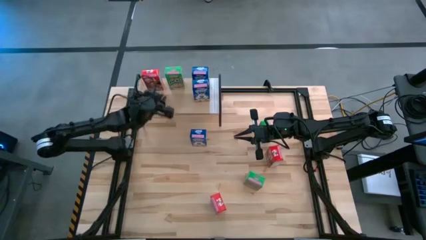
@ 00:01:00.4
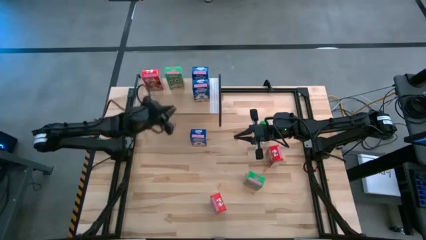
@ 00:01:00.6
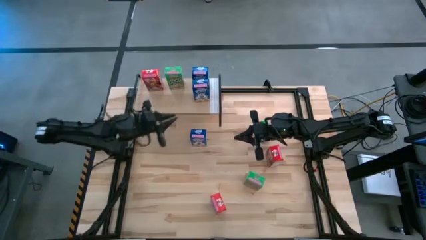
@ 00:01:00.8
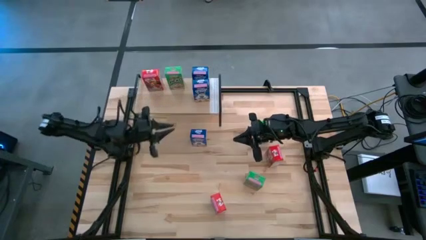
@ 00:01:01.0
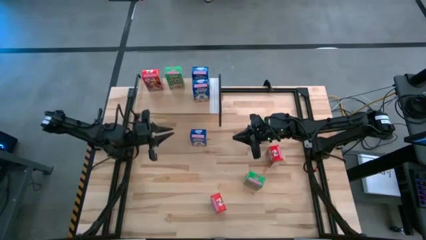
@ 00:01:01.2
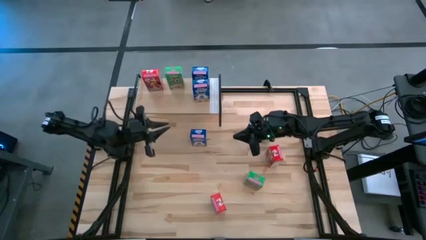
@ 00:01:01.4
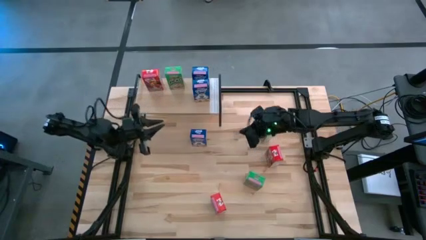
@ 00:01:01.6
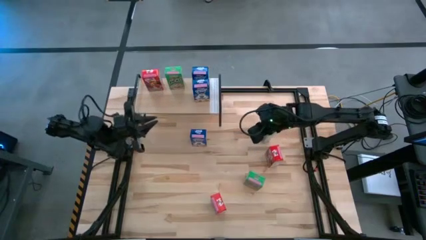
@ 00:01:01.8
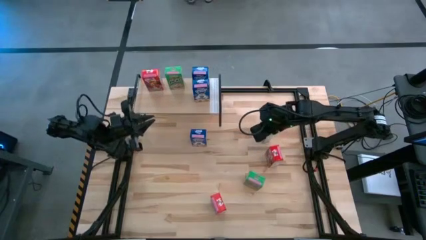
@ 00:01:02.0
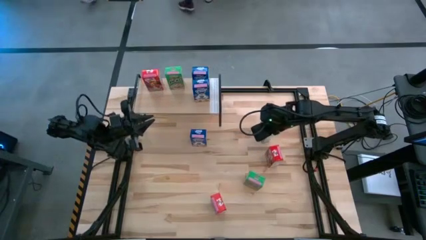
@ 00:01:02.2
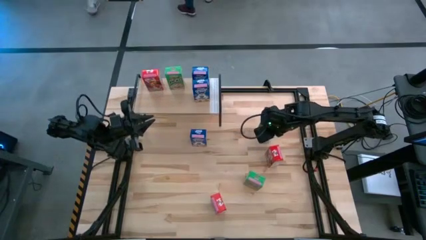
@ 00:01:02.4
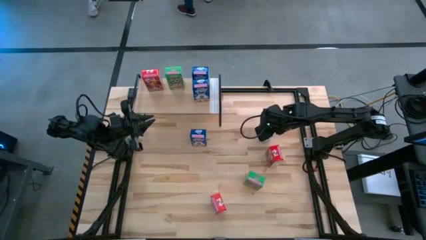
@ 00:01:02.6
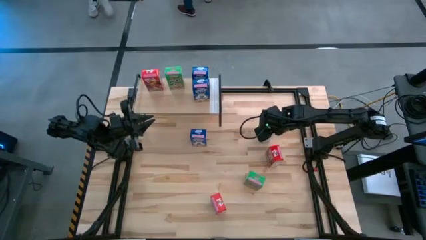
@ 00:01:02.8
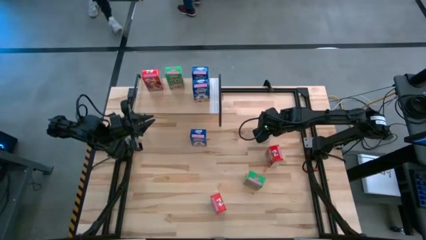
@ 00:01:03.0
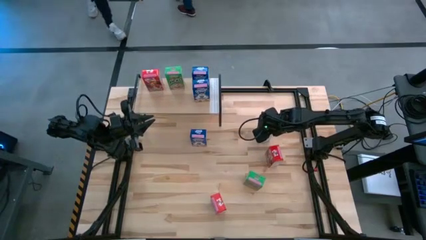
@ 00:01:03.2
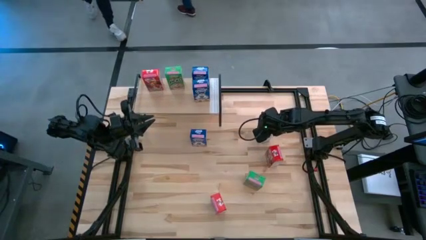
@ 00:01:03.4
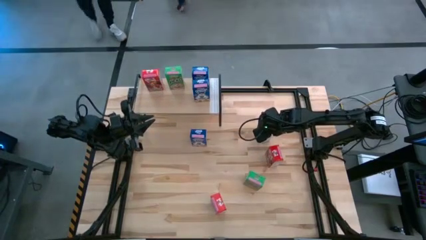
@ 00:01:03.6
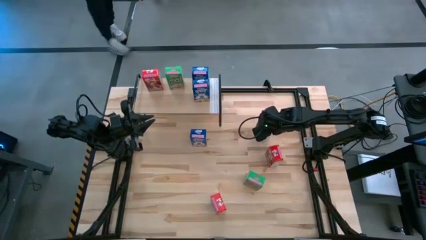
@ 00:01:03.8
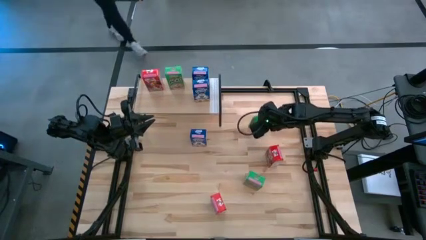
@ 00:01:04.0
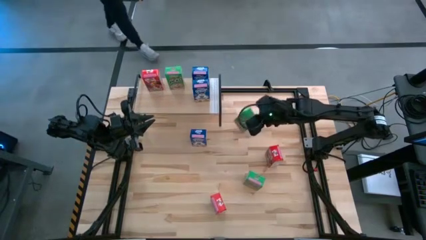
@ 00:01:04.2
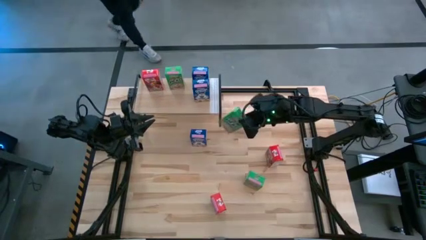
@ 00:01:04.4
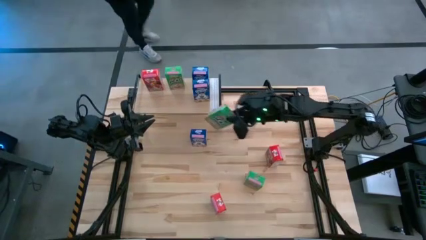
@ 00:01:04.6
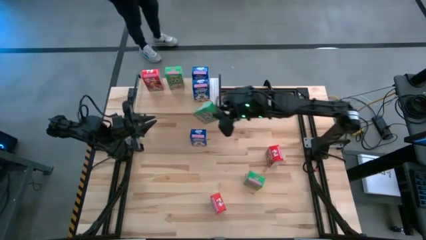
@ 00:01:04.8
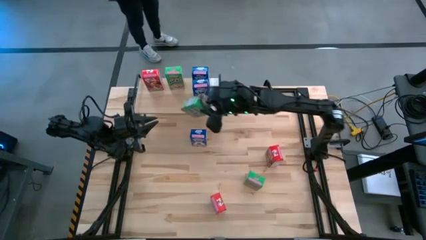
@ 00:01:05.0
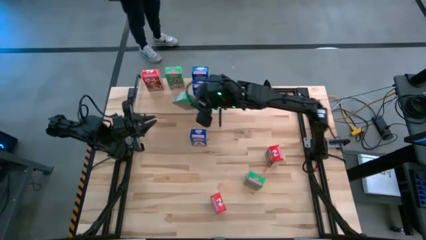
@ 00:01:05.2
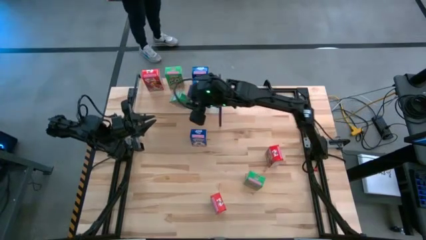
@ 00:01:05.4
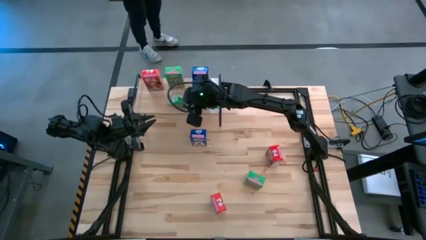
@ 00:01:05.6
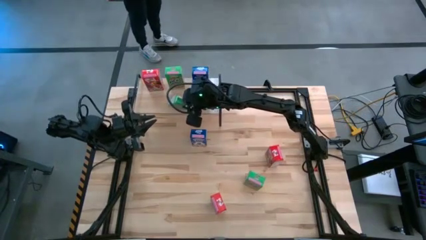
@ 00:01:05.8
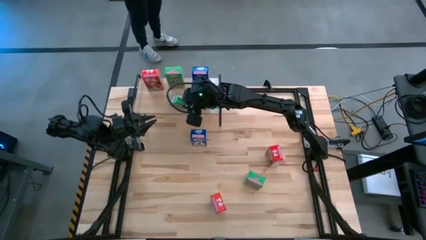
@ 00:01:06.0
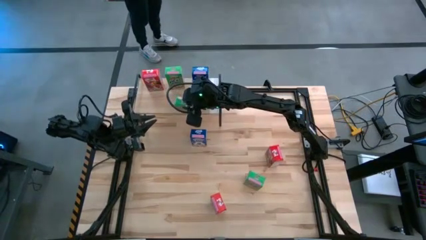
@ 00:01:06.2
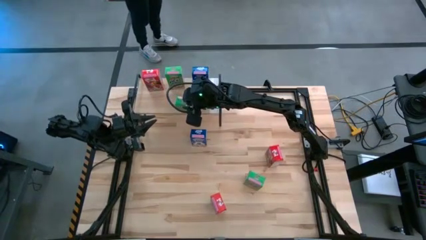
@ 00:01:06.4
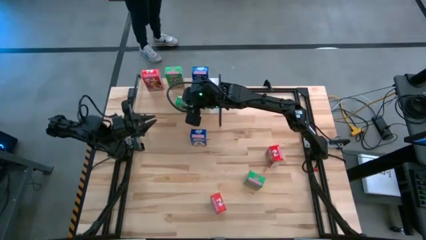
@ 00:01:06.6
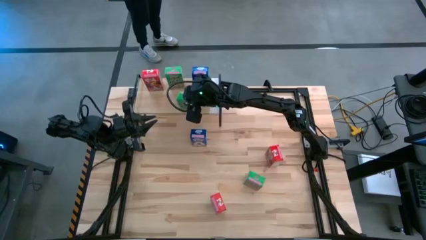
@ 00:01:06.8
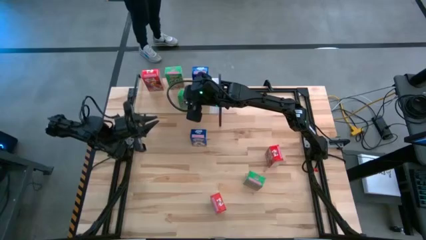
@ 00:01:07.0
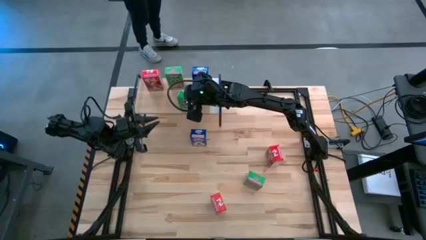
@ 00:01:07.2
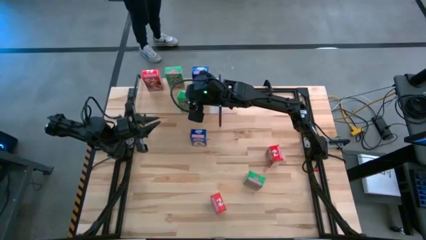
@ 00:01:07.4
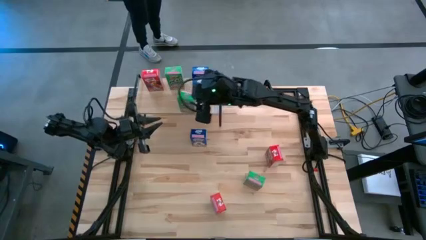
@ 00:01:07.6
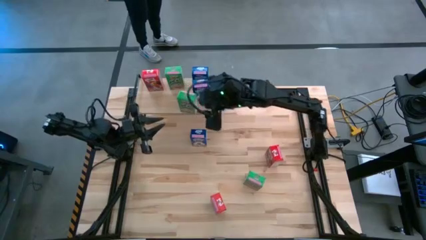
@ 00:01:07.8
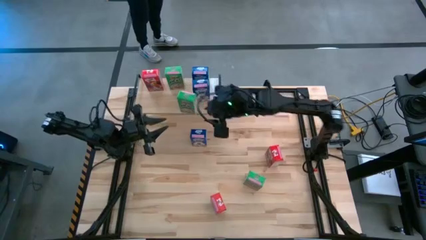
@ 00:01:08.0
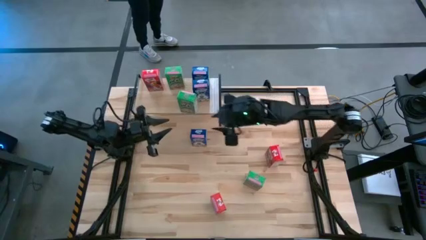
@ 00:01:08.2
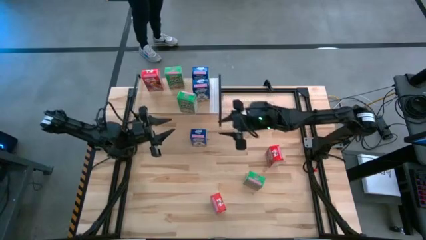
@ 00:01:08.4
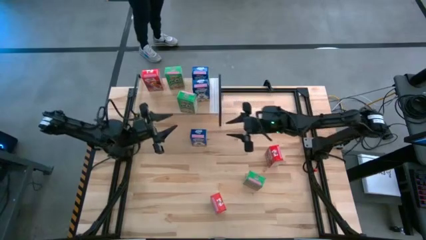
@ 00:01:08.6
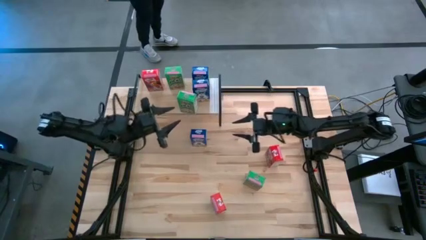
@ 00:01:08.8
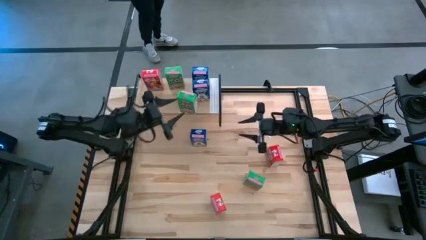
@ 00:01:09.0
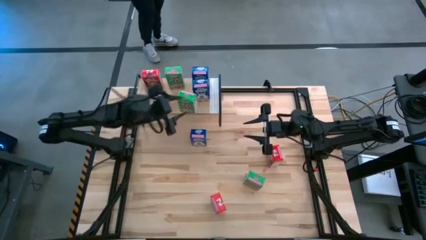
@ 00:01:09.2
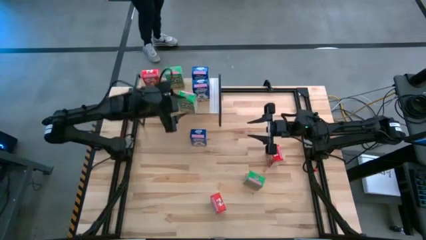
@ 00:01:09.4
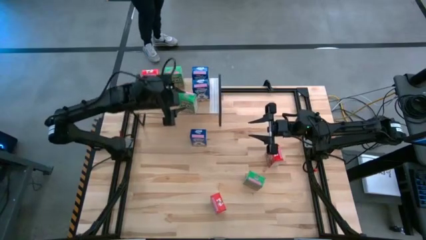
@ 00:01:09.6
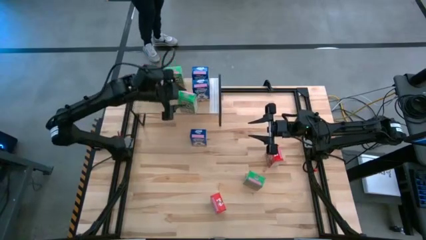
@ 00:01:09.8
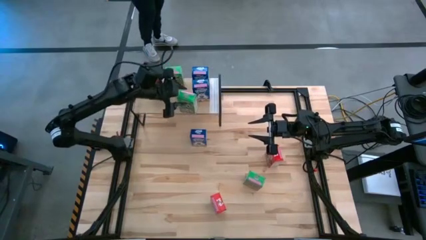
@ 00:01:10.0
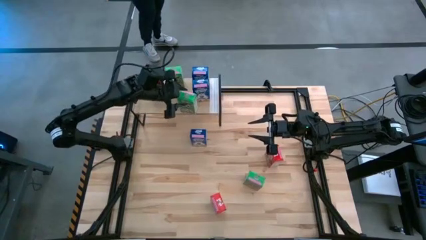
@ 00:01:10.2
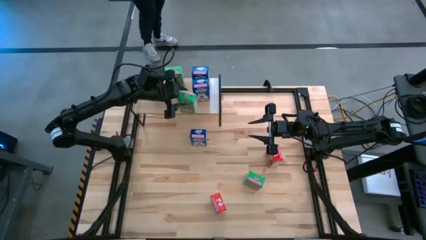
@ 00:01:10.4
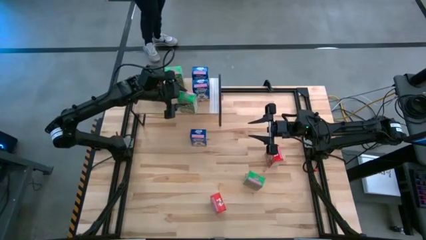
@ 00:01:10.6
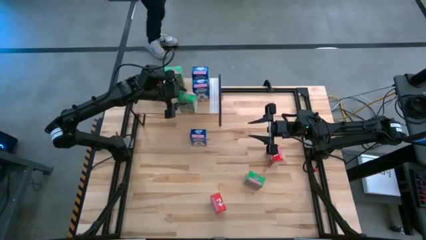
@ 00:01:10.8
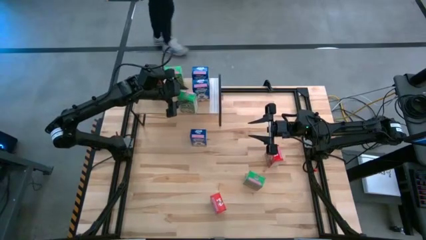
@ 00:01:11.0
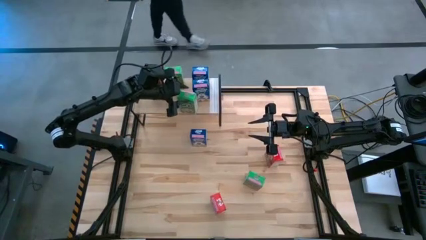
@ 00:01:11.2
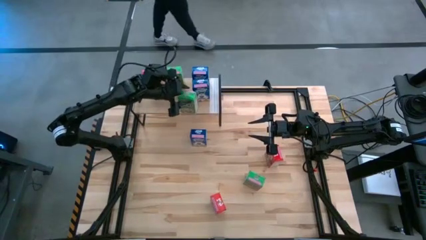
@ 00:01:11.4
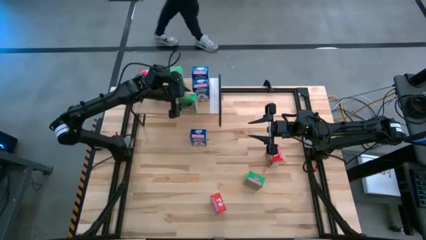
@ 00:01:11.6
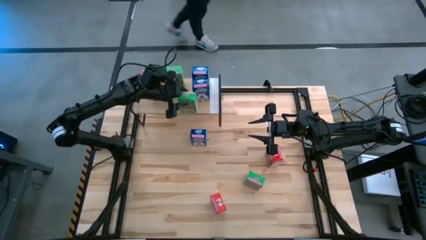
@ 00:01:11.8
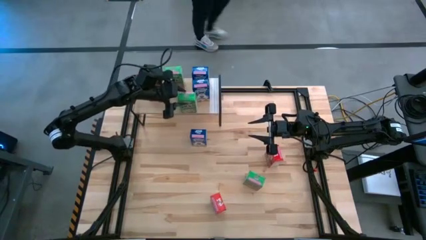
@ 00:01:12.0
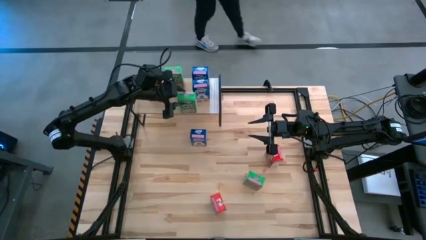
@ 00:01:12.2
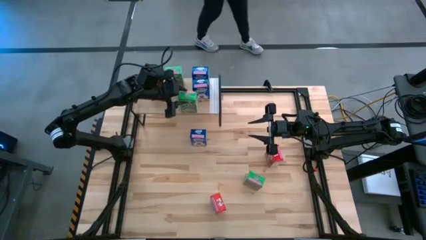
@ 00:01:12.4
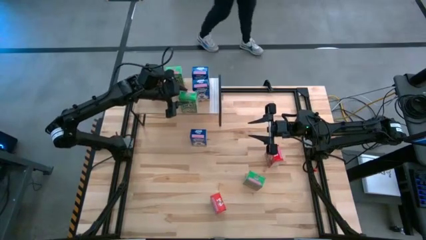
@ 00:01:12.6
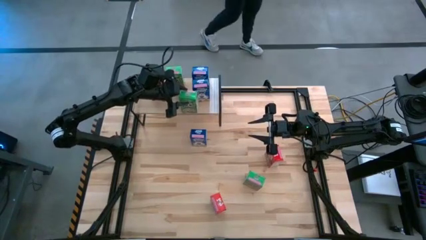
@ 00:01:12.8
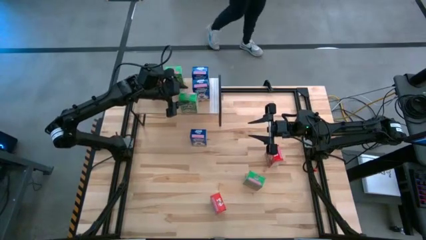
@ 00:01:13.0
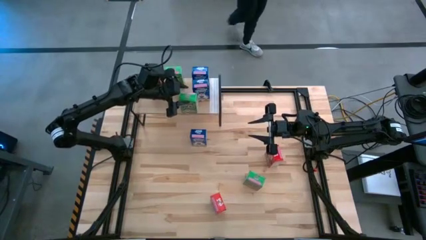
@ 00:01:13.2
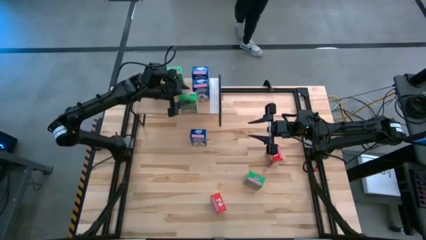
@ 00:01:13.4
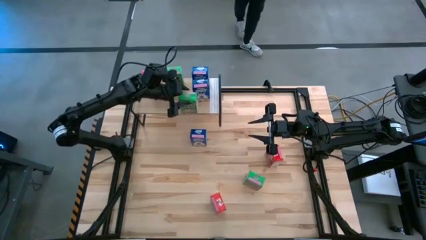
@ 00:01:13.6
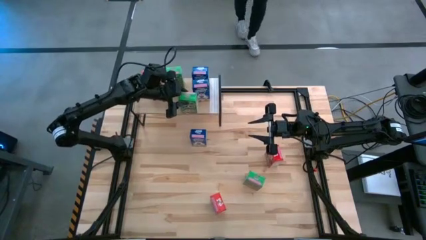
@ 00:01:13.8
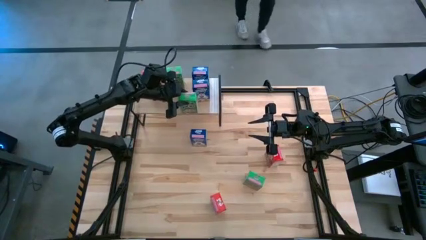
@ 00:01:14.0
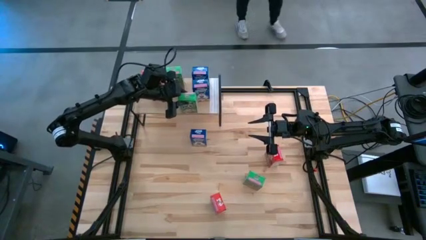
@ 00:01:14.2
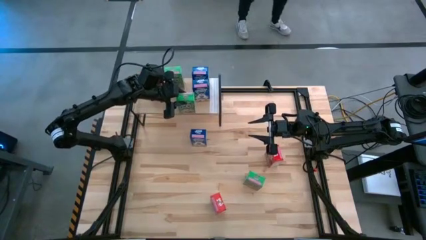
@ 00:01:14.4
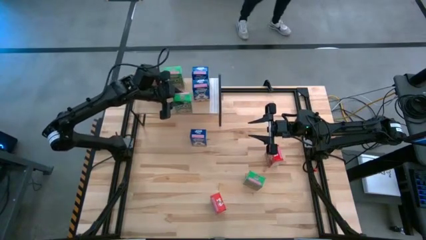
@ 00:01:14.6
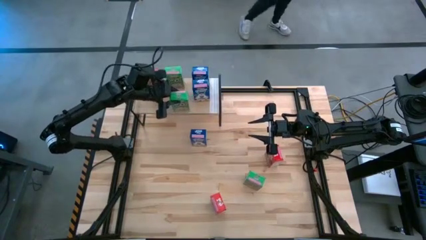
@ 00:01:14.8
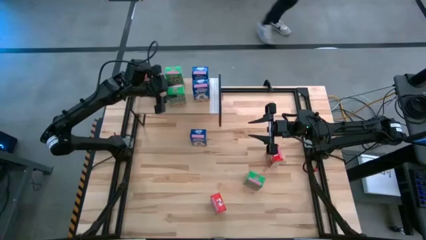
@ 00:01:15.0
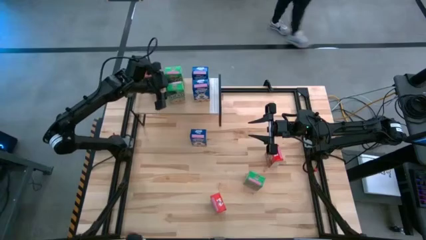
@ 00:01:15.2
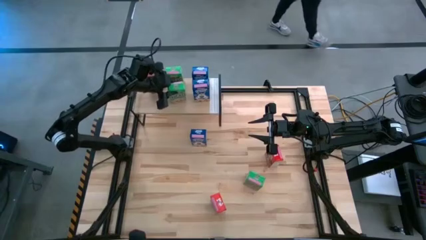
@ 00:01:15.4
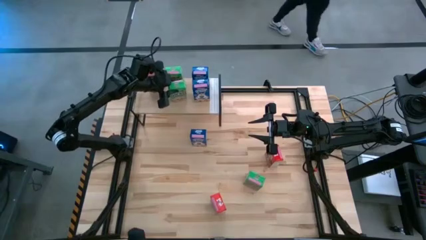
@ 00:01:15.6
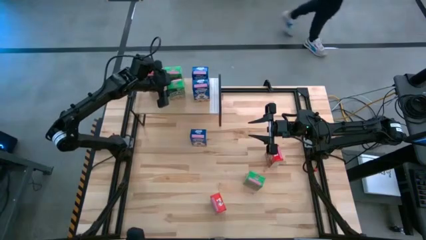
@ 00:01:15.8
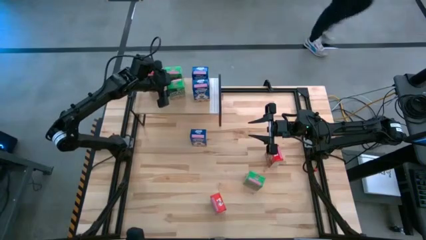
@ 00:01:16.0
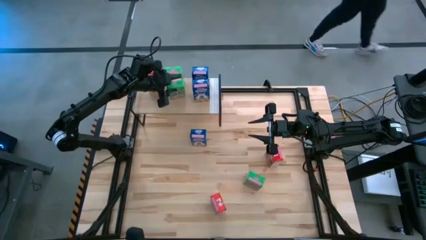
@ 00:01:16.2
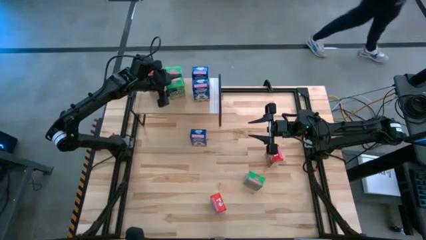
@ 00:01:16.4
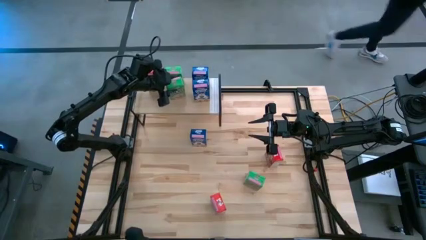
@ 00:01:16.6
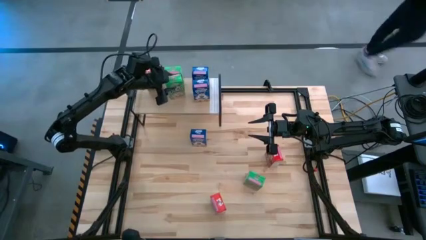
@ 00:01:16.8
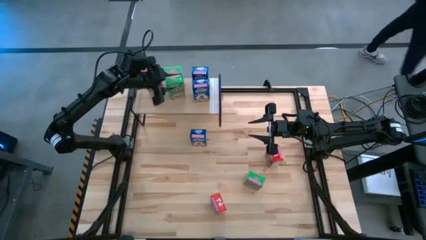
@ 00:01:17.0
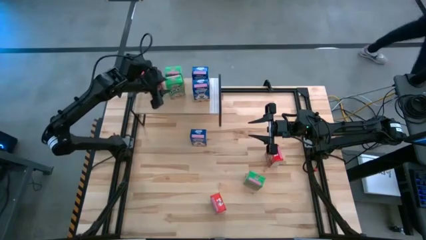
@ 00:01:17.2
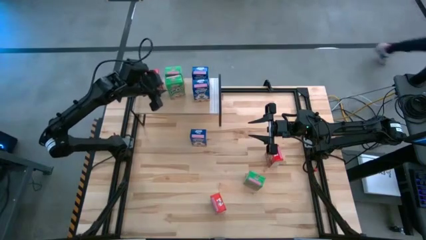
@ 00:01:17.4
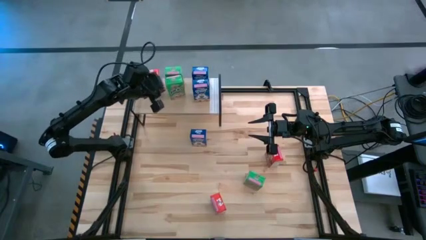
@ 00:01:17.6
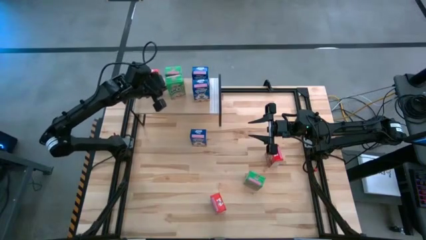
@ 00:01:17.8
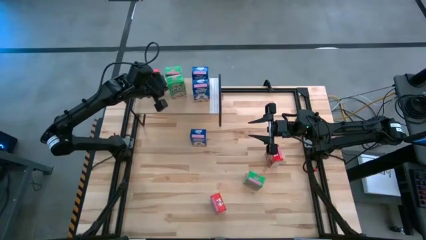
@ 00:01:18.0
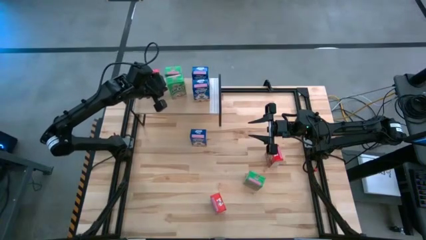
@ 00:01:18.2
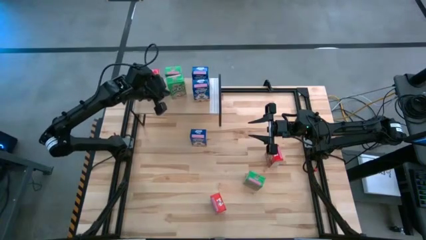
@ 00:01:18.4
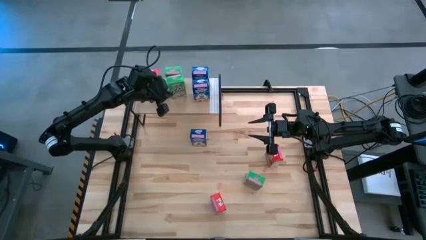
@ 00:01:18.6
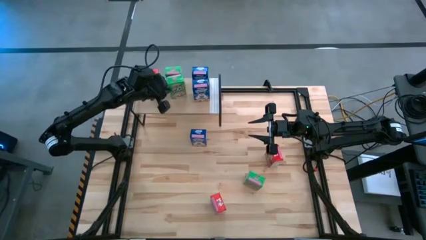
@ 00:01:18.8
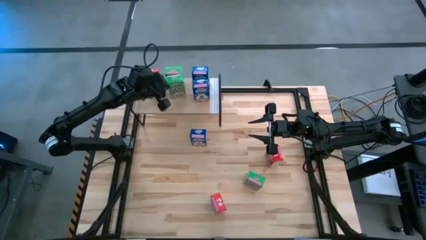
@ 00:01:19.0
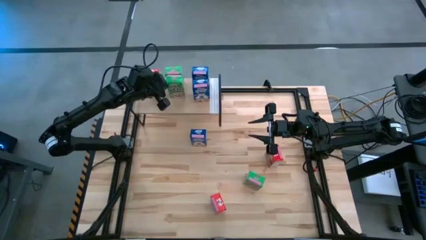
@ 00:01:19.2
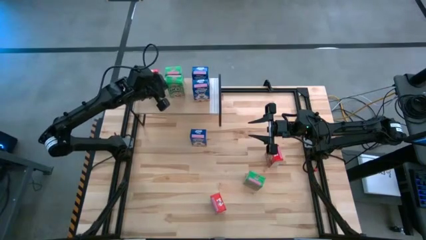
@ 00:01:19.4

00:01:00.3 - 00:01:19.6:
Task: Stack cereal on shelf
Put the top green cereal box on the shelf aligned with the other green cereal box
